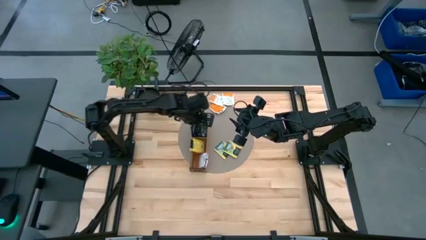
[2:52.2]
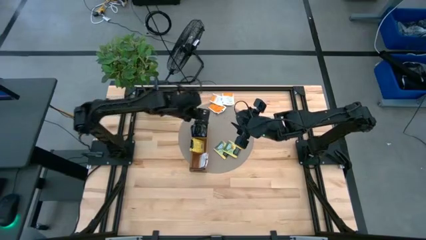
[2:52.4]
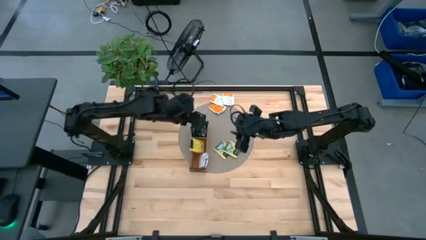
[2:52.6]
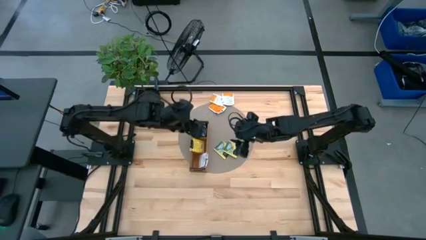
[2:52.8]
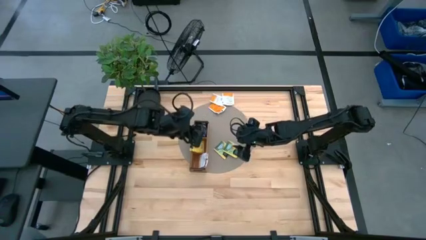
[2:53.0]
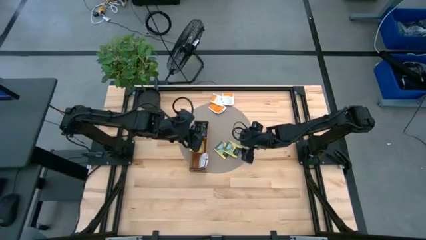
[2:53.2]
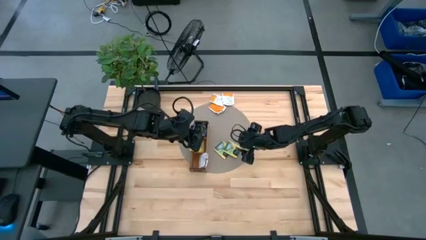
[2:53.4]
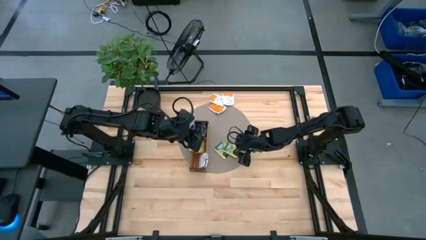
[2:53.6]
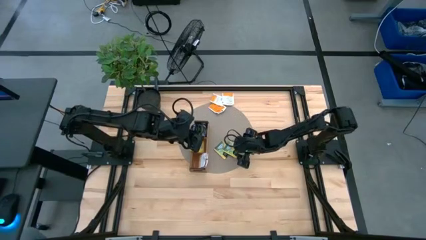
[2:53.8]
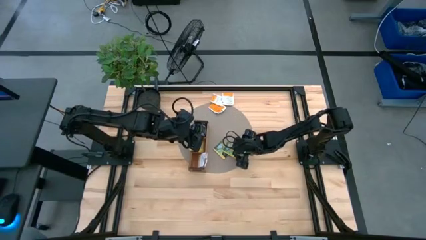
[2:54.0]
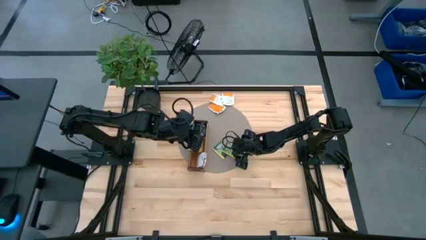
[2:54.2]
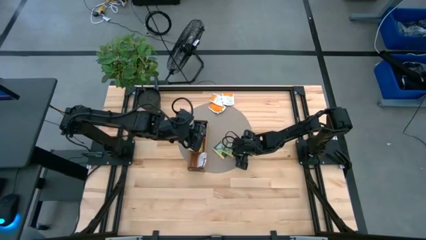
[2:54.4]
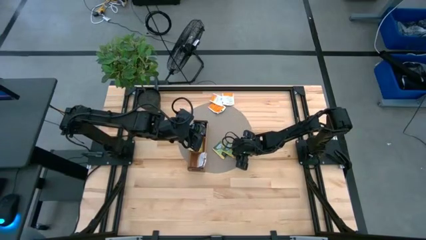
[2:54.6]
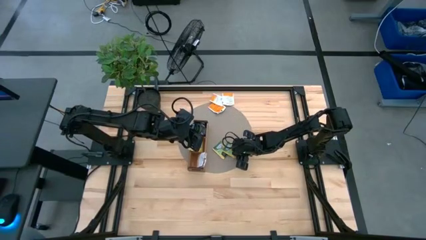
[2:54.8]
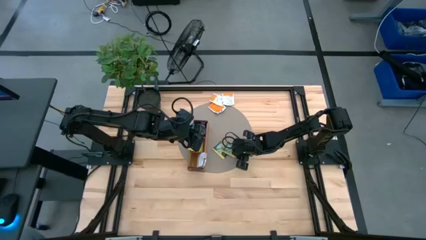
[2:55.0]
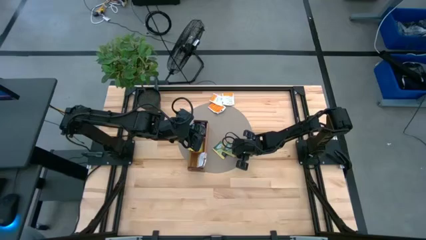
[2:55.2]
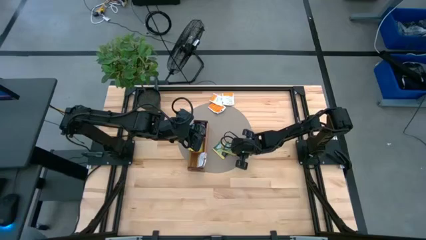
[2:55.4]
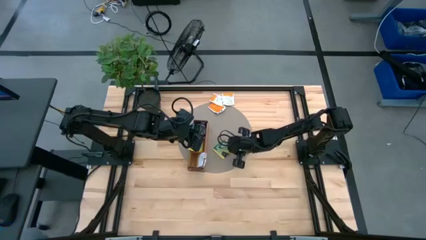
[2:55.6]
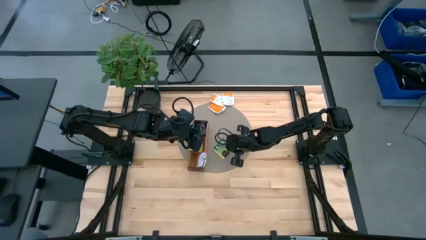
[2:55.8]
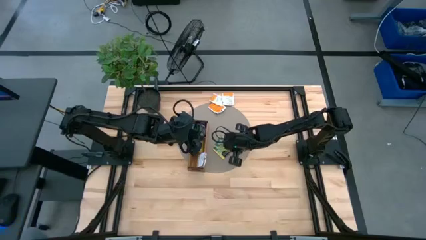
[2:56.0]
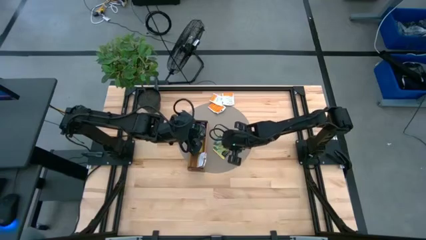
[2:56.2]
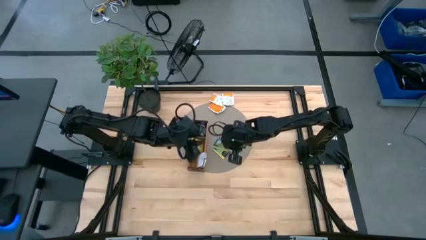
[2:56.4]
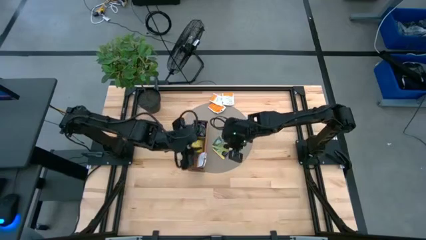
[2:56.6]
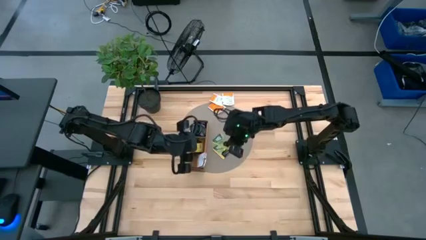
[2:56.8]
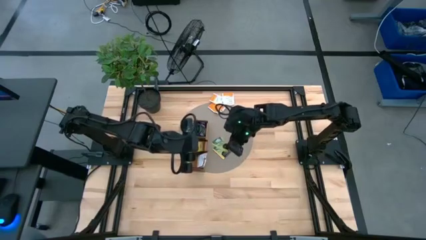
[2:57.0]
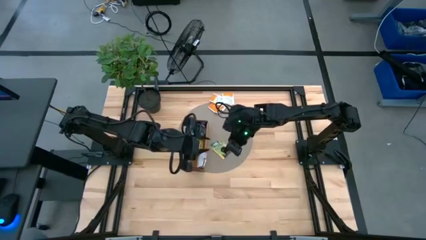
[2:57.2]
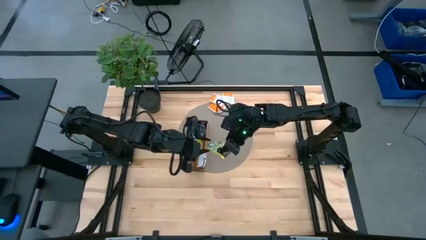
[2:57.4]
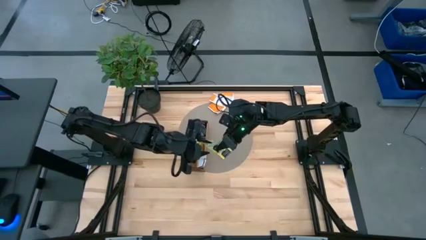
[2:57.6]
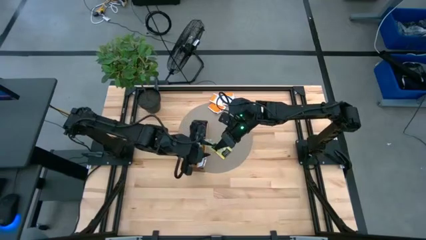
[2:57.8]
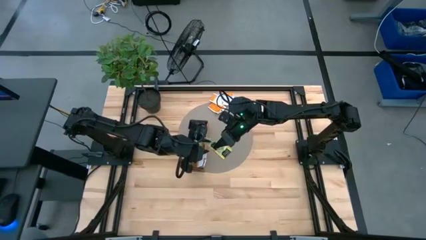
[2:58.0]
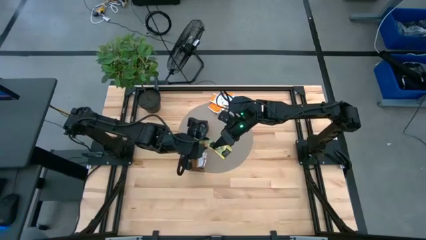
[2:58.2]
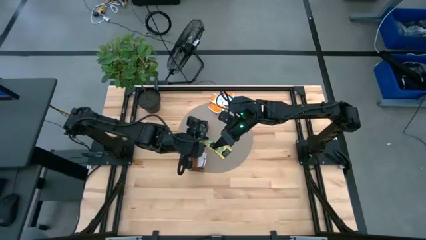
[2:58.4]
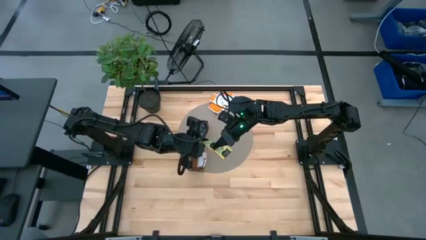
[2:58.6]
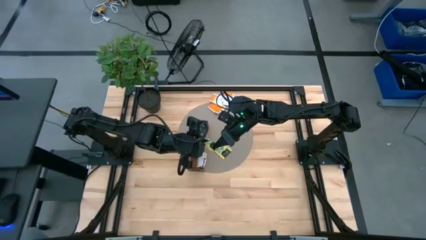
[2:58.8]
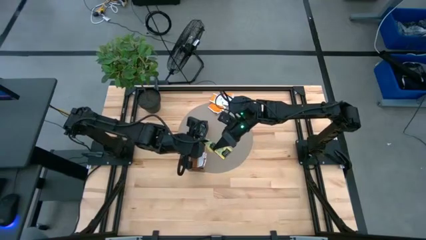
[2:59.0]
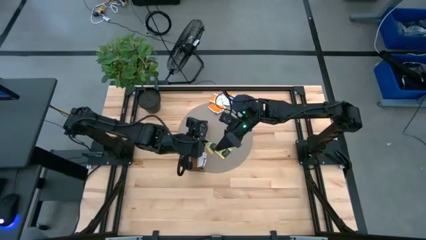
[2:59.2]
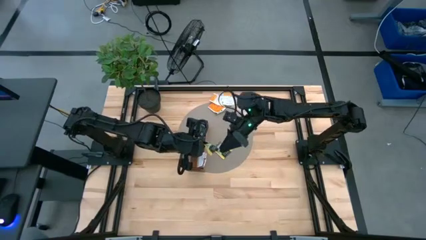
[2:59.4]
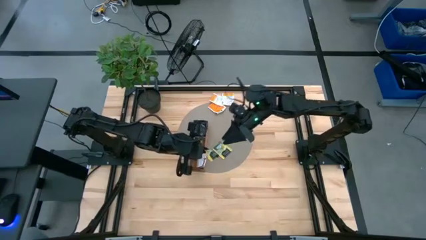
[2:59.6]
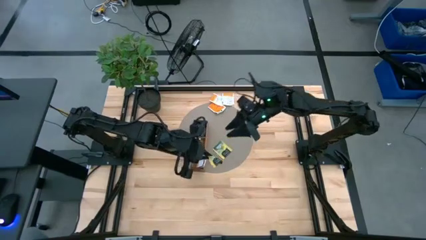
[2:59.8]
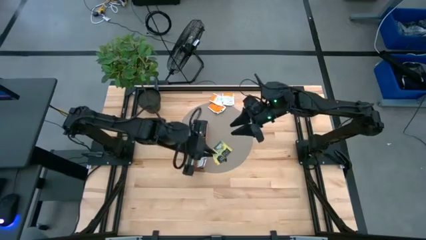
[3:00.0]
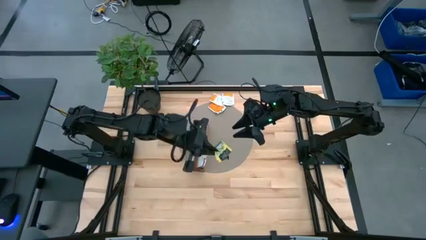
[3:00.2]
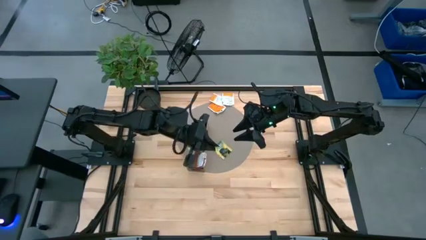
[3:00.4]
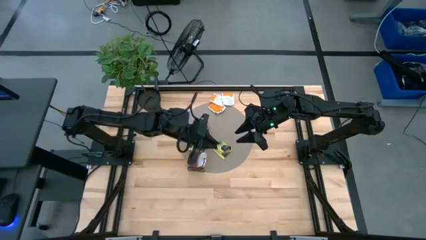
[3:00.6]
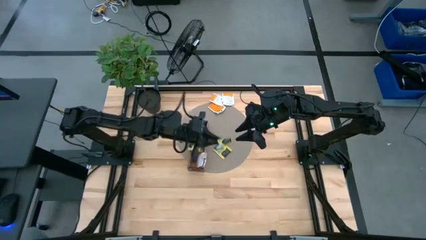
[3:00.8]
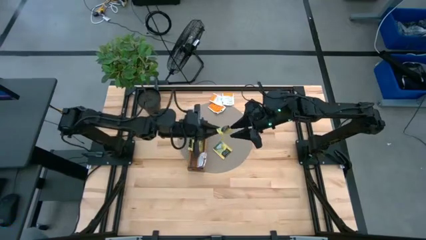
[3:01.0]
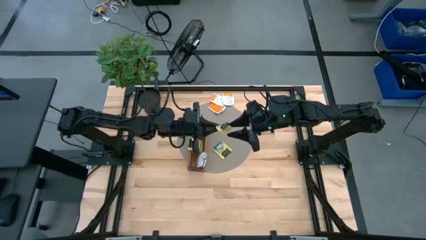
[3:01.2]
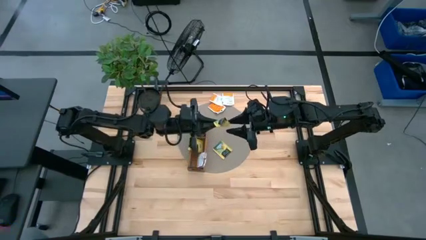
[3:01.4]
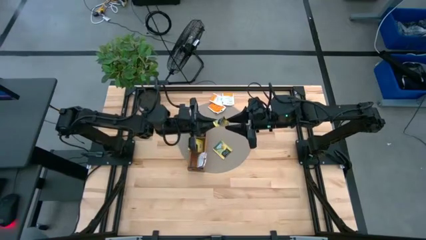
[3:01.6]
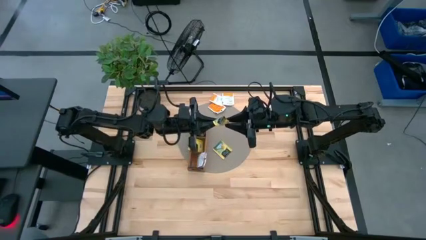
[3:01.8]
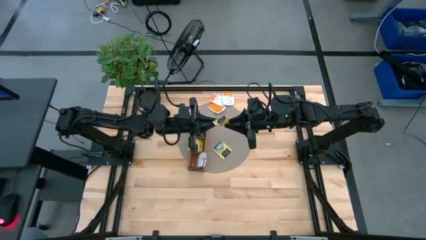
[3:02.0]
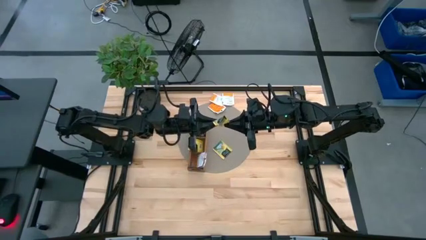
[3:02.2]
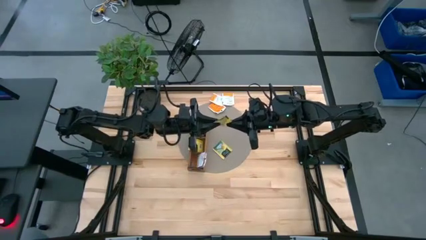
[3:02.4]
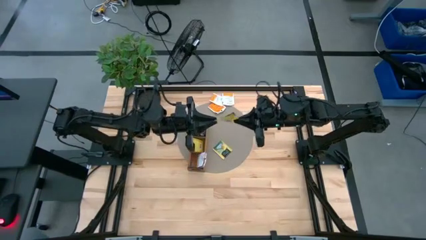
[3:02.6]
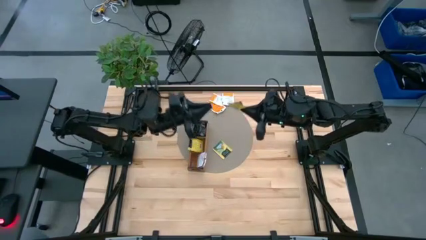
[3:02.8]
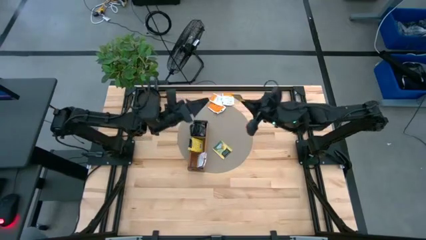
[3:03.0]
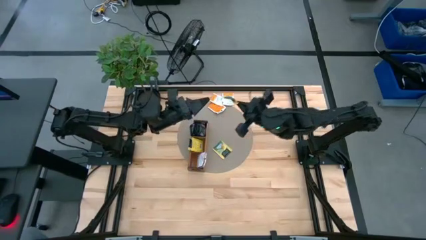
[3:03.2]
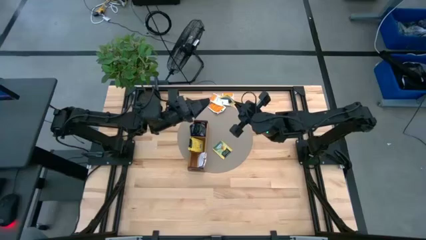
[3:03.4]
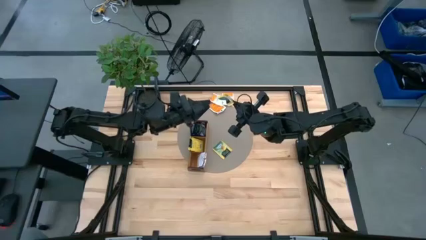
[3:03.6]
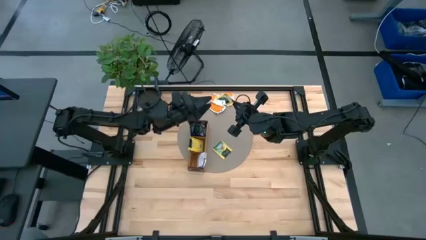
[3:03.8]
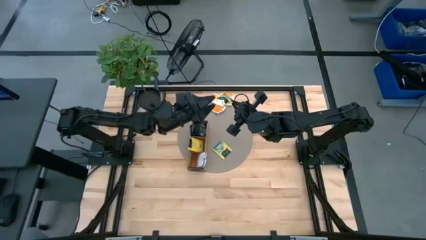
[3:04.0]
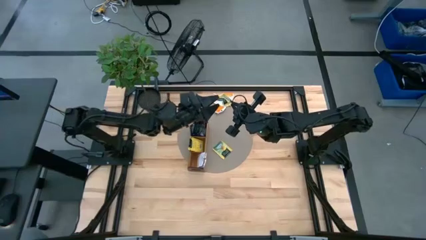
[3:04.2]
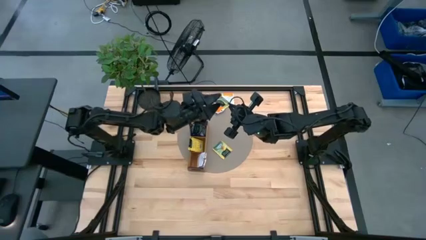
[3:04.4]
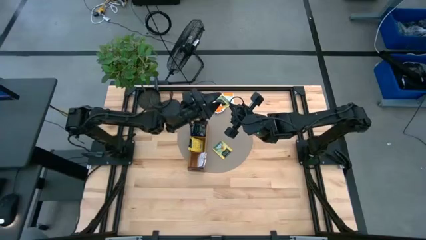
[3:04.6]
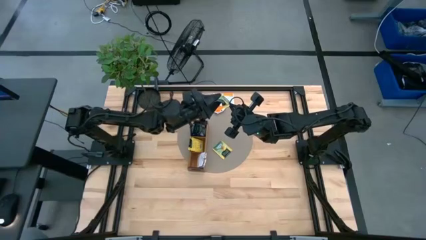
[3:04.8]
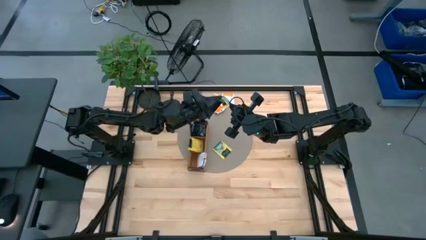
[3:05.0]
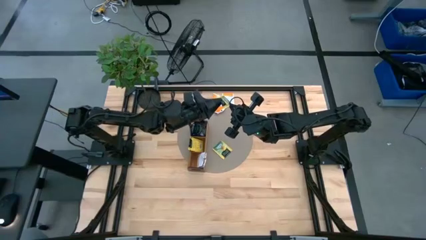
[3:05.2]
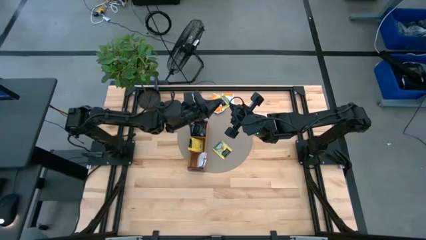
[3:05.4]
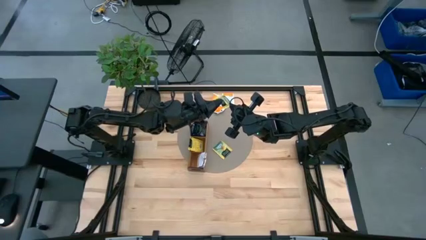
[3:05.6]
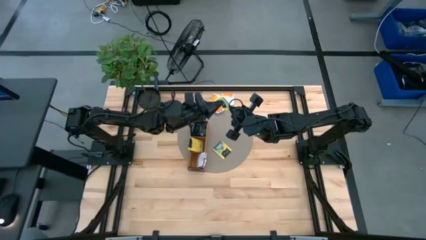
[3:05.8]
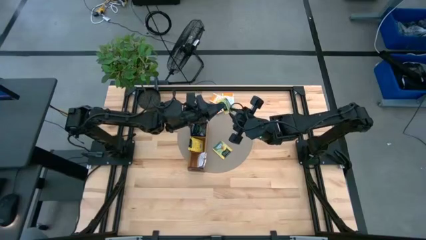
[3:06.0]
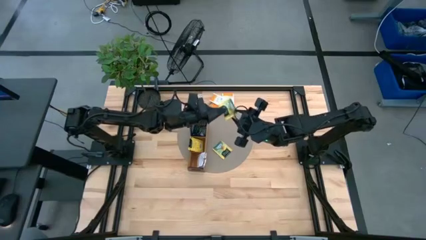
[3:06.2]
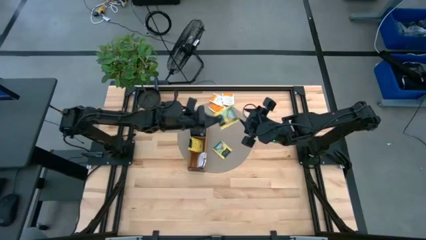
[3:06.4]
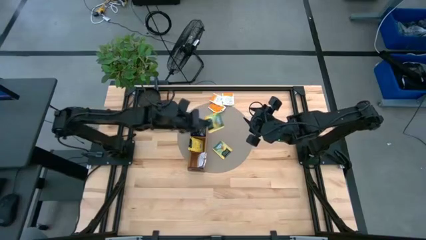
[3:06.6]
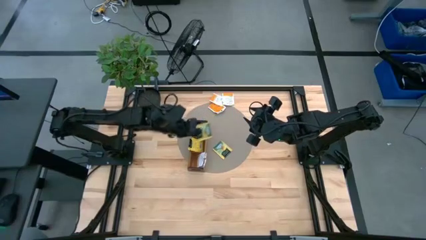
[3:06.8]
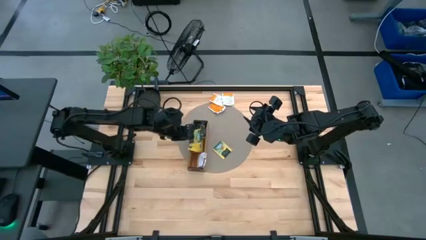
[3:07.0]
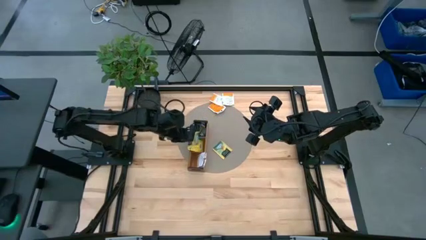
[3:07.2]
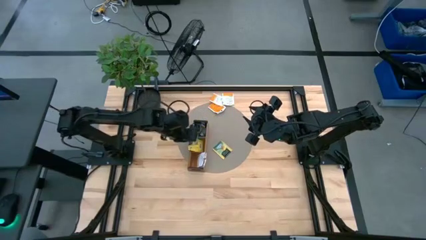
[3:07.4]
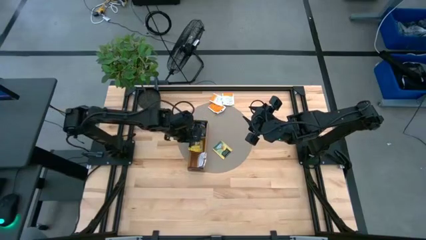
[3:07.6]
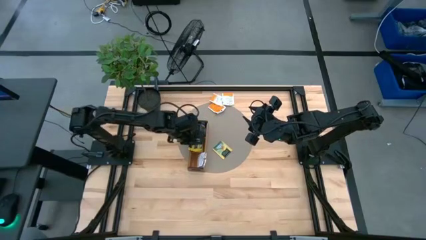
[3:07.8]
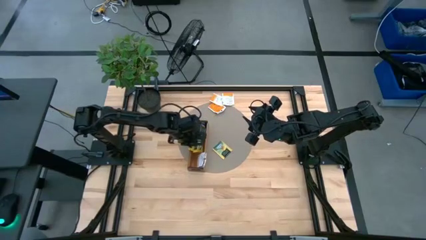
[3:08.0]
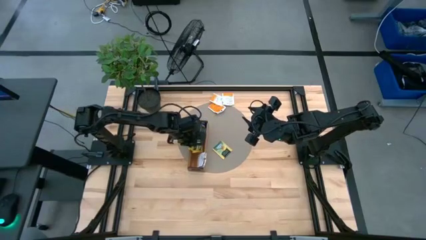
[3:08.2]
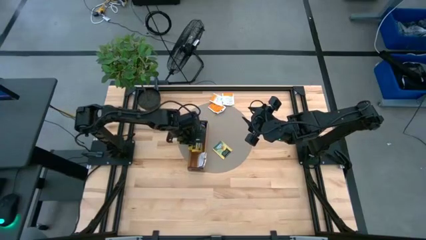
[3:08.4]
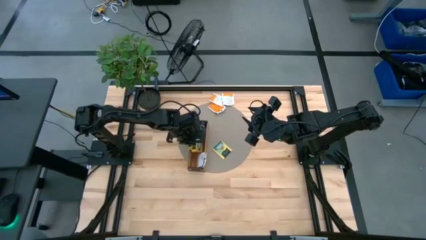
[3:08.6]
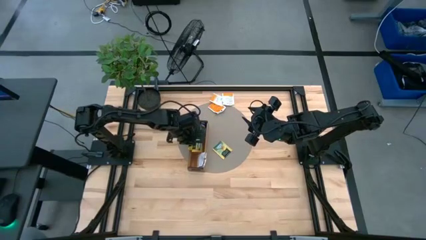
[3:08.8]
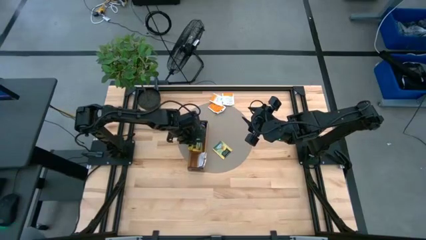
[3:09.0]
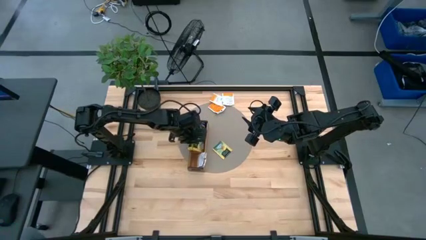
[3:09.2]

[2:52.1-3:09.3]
Task: Pick & Place Tea
Put the yellow tea bag into the middle section of the wooden organizer
